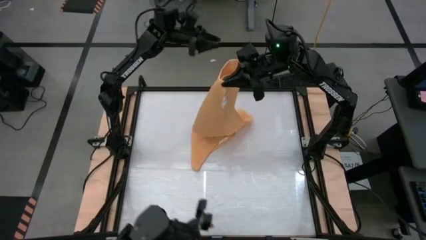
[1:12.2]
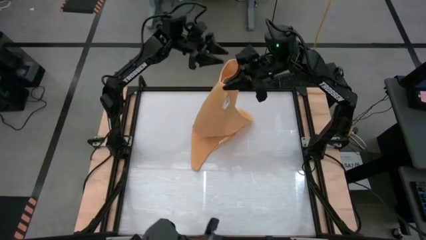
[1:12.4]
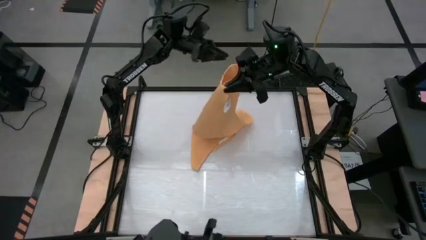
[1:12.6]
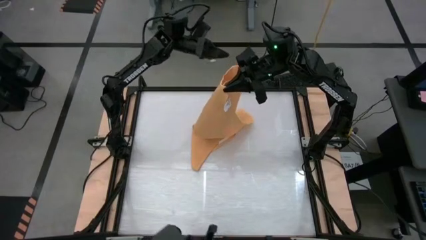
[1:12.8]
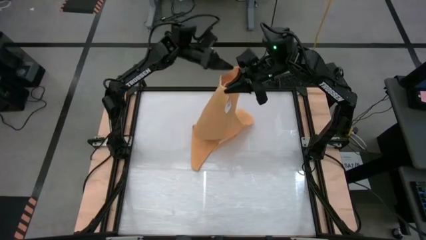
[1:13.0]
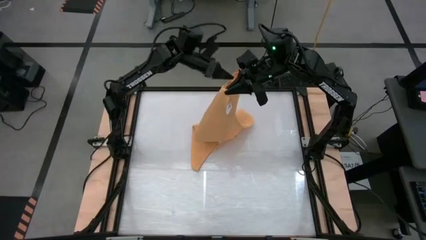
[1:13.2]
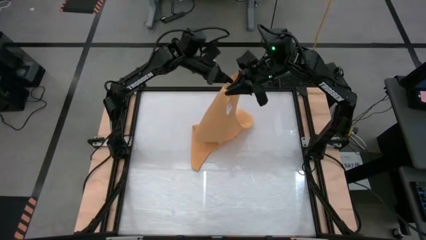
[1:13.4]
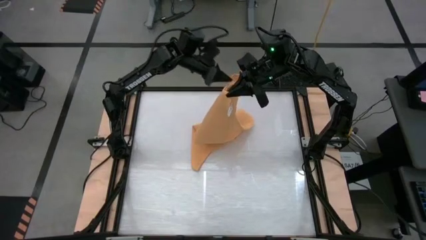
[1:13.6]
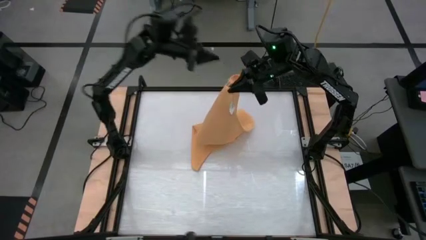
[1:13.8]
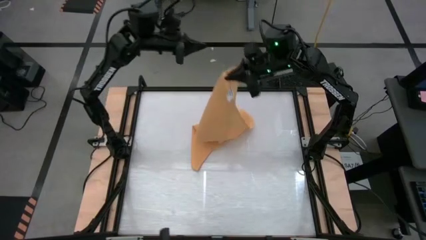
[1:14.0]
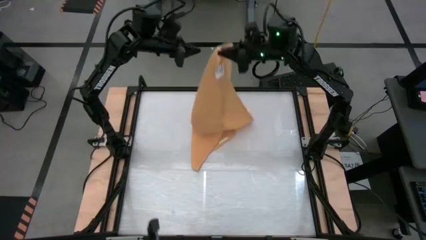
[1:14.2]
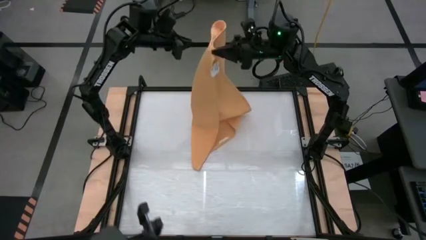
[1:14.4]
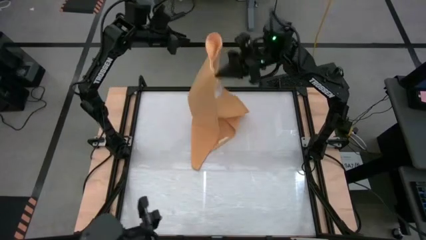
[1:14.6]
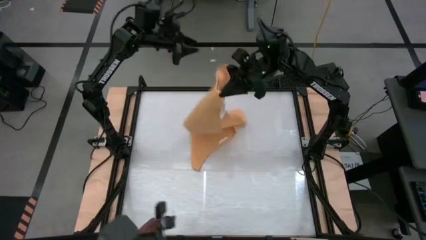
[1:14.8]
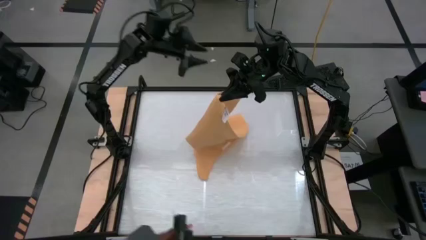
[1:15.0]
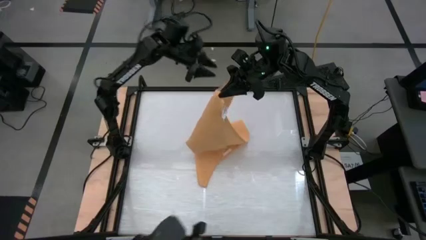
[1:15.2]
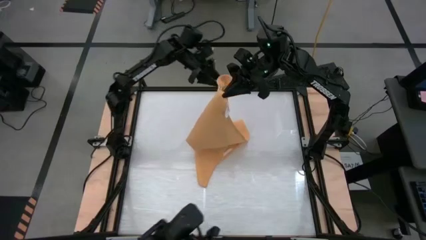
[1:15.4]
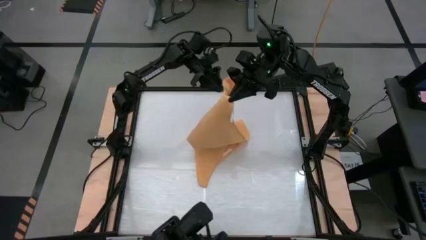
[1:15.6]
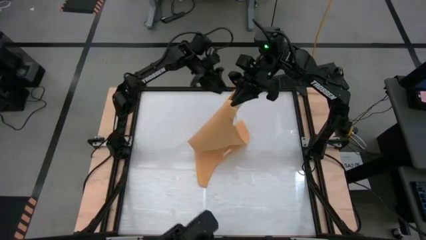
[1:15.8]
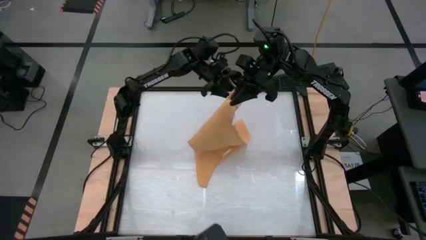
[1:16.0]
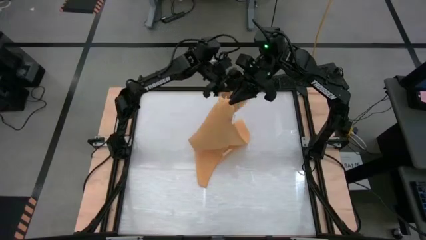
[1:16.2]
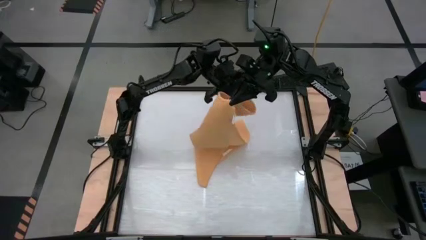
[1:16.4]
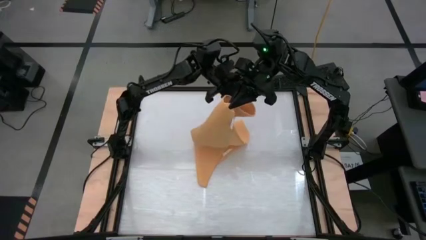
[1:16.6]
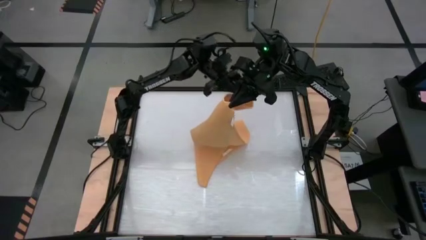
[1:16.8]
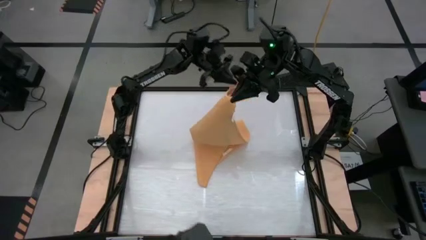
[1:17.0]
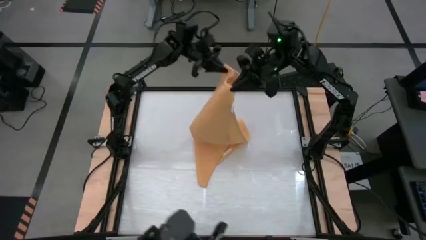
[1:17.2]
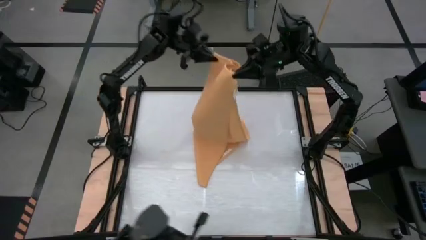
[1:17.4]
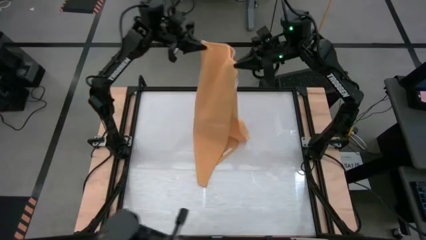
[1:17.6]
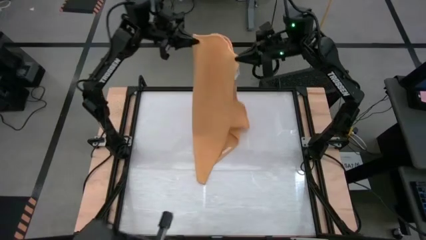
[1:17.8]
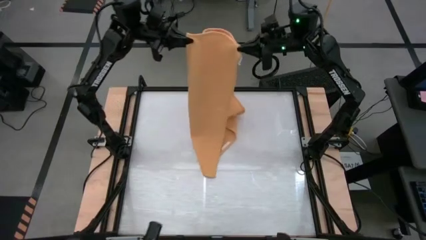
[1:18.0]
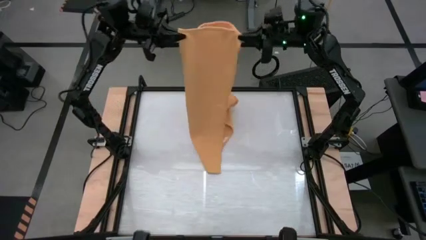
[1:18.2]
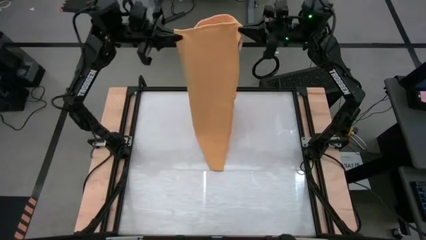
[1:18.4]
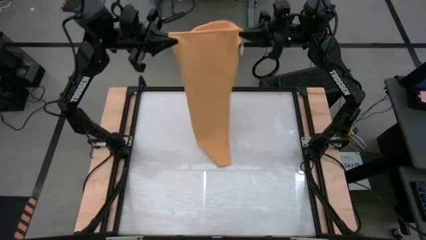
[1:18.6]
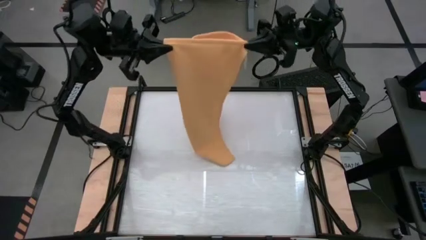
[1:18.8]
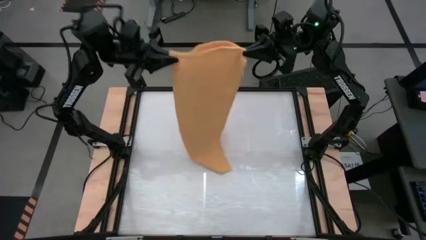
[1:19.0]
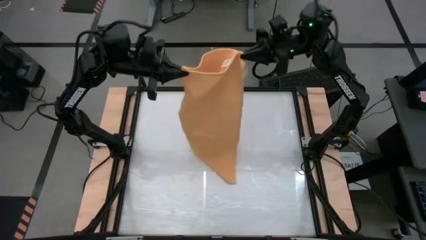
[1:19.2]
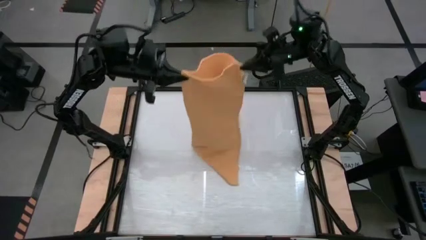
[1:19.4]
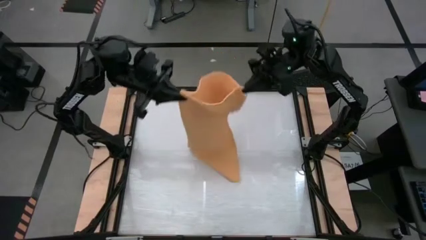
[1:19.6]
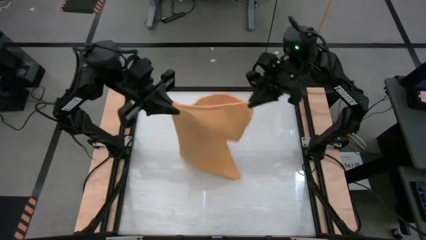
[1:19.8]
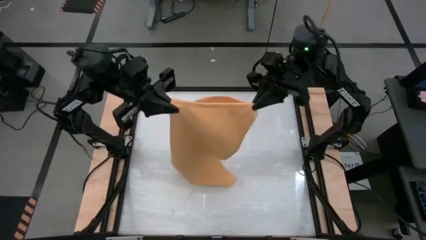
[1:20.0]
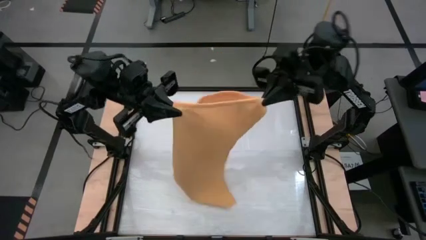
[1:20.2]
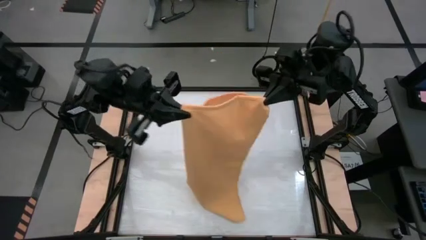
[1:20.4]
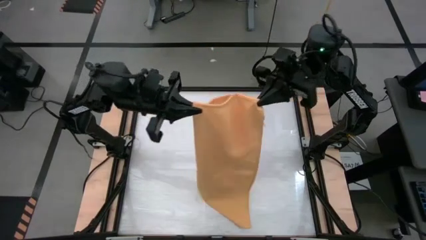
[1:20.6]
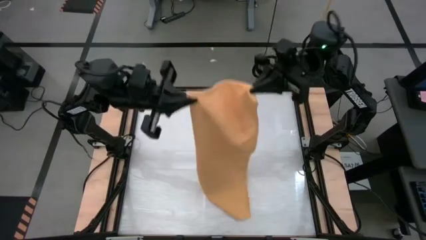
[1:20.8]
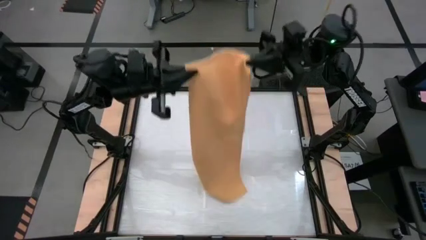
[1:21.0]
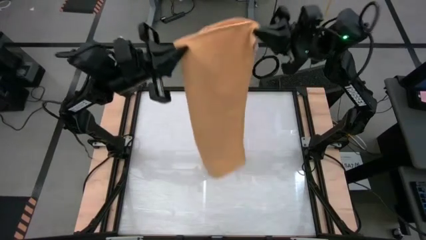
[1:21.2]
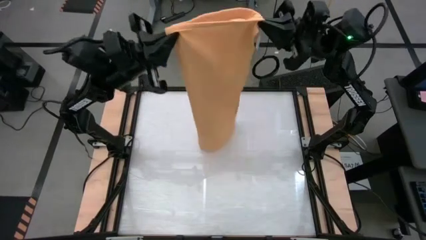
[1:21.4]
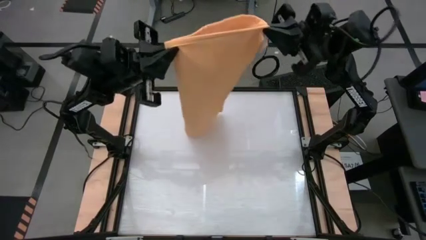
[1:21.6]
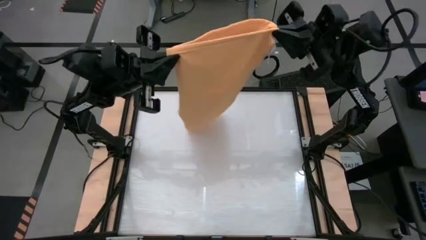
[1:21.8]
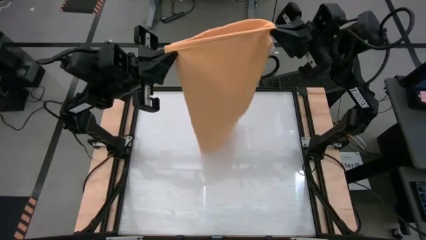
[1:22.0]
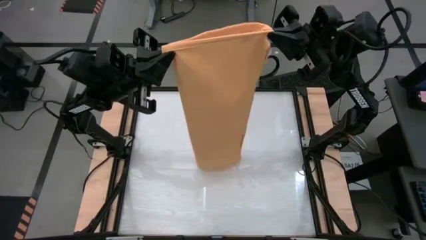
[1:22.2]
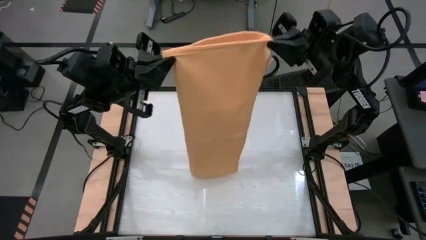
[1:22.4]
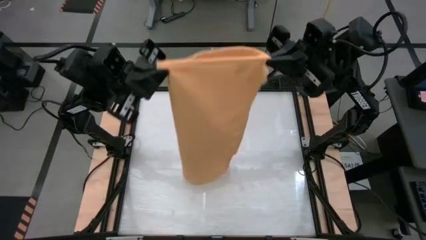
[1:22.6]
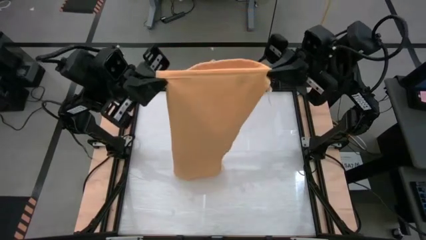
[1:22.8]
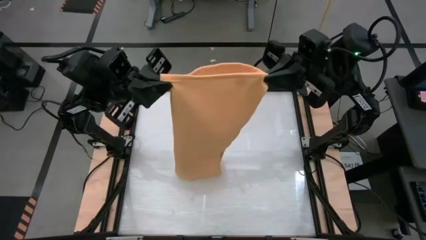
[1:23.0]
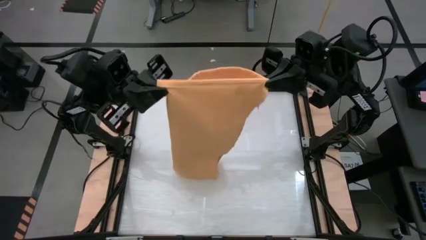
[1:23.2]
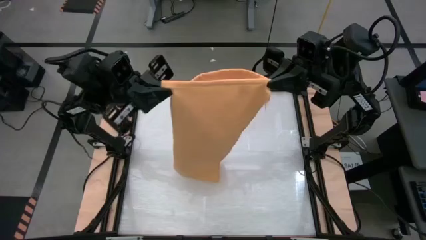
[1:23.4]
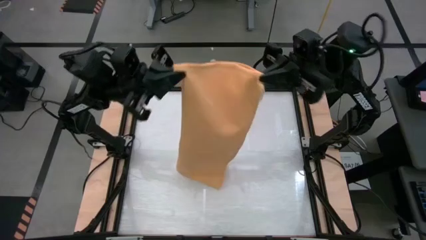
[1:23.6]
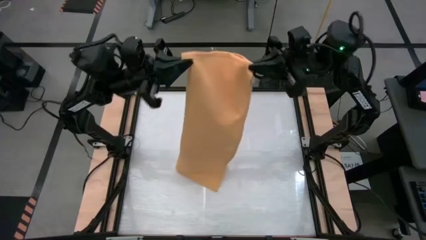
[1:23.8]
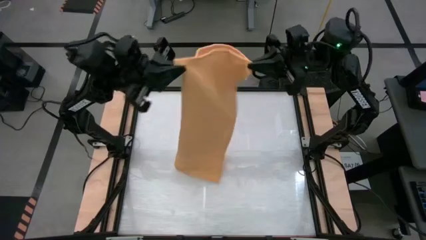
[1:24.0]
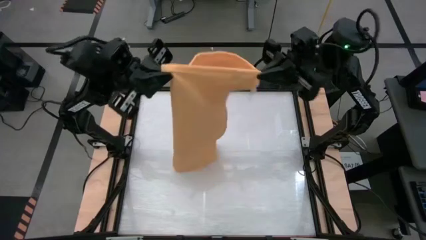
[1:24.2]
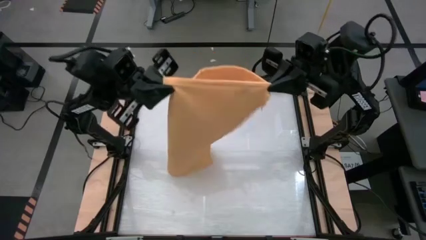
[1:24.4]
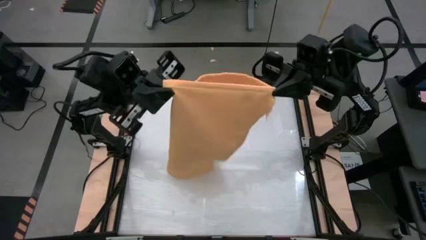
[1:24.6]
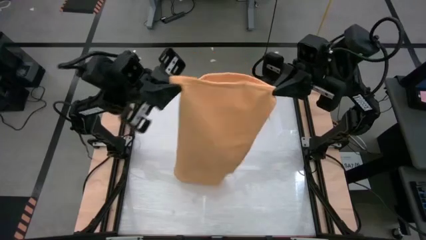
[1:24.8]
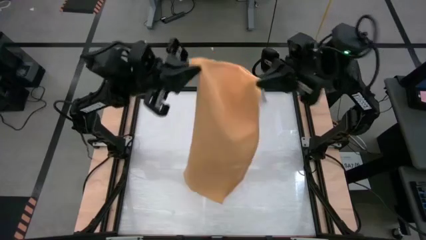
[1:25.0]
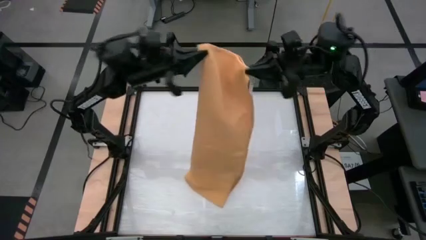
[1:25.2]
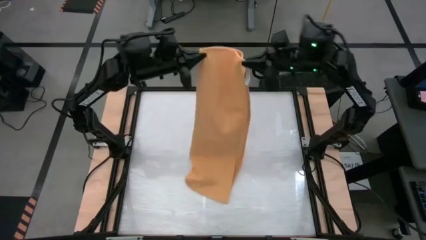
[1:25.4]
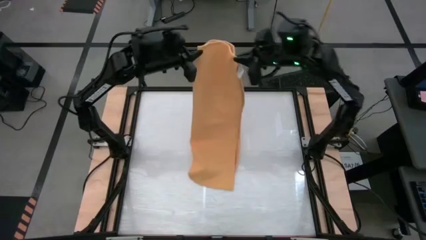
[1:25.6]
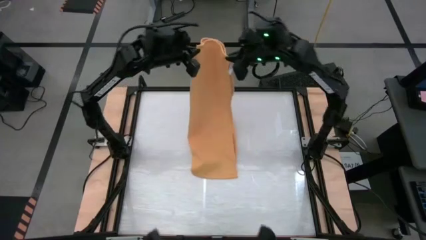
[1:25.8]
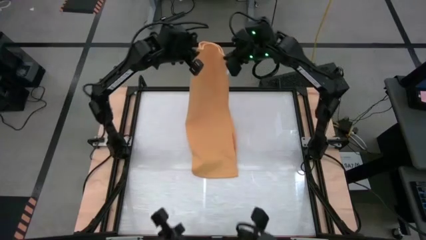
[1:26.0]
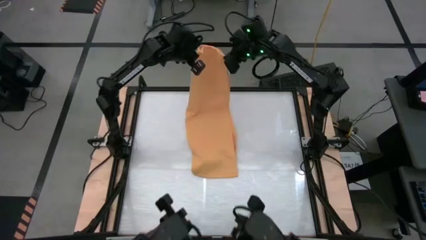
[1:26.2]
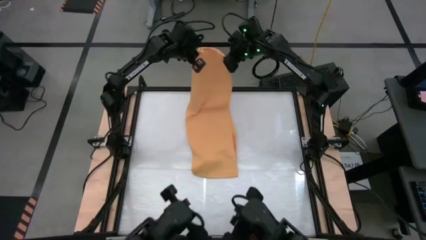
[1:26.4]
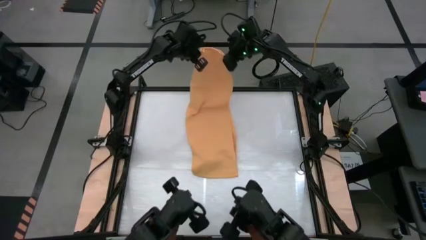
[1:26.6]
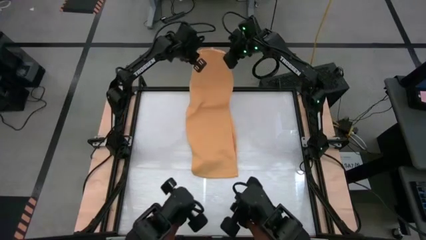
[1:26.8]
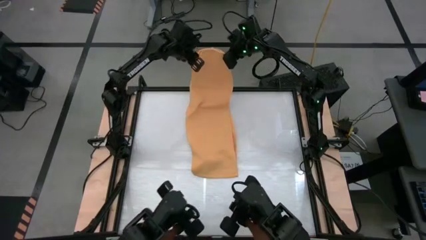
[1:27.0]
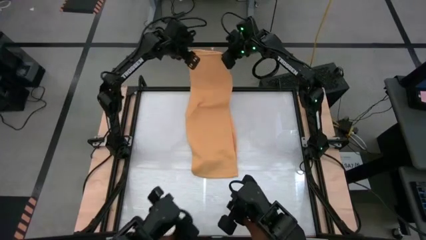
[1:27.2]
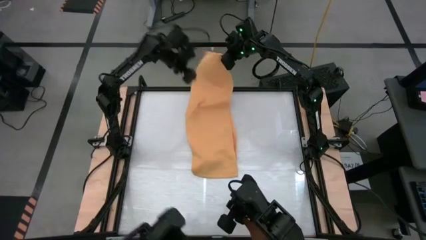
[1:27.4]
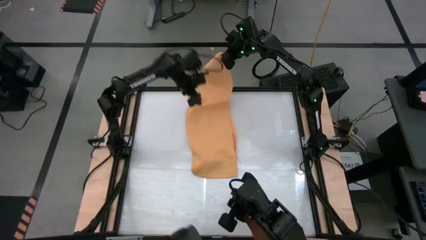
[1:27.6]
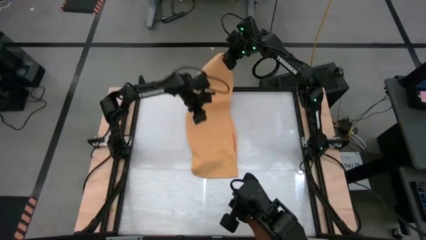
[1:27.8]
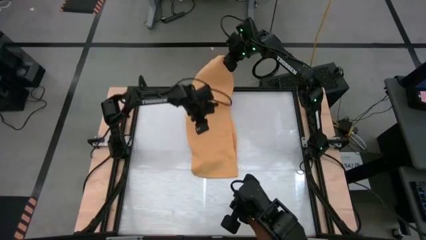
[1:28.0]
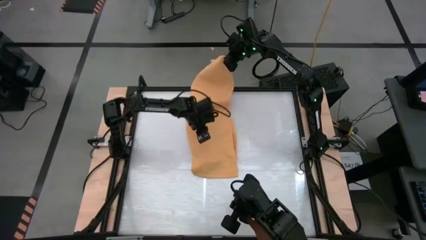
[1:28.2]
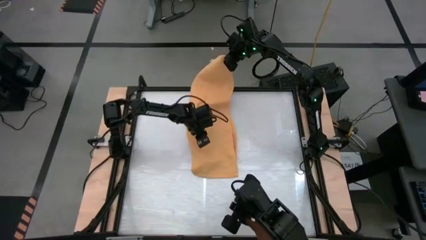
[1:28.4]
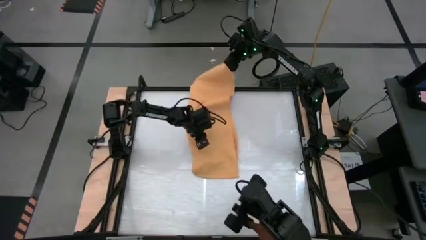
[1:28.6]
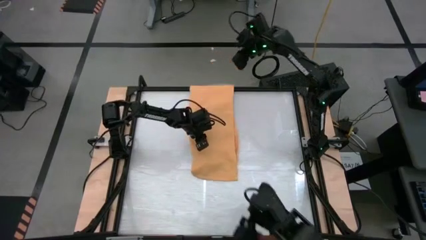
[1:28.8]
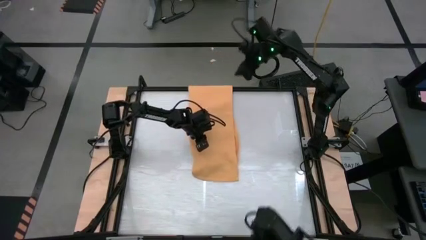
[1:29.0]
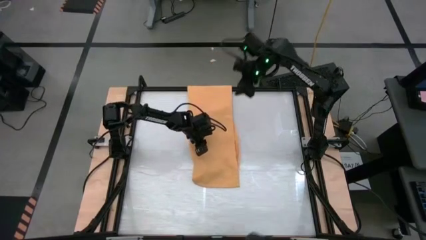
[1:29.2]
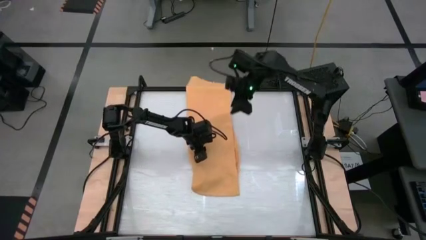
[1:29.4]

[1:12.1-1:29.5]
Task: Roll towel into tight, uniform cylinder
Roll the yellow towel
